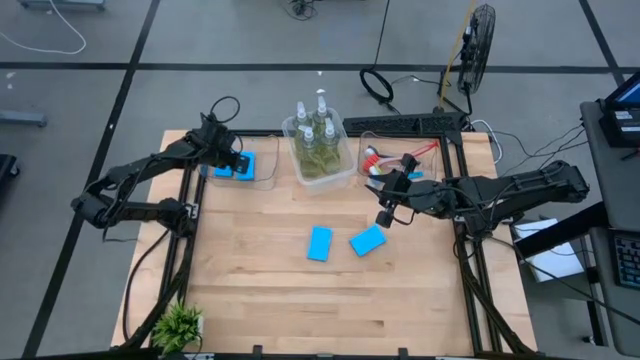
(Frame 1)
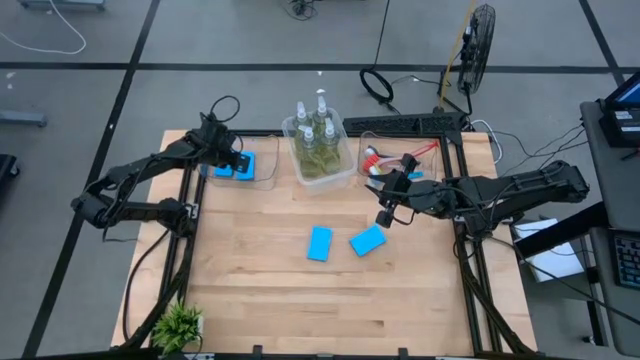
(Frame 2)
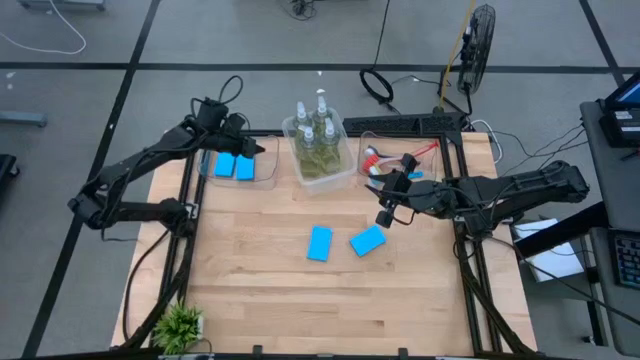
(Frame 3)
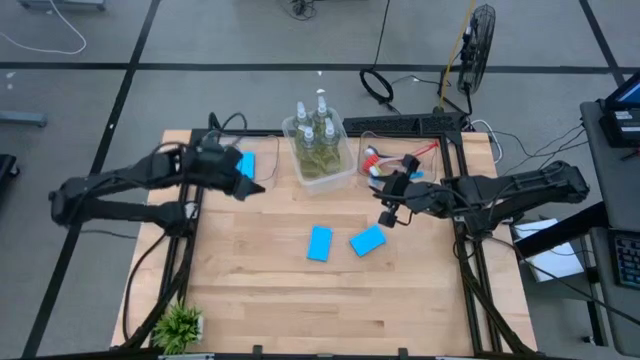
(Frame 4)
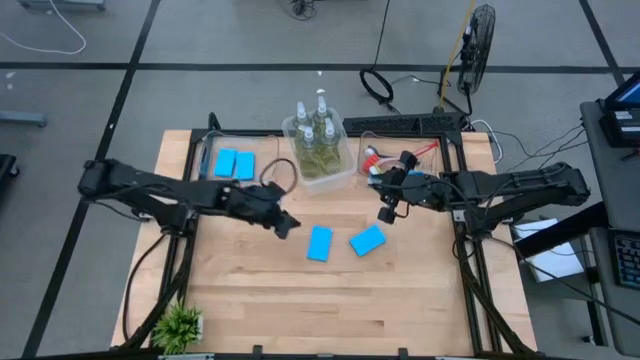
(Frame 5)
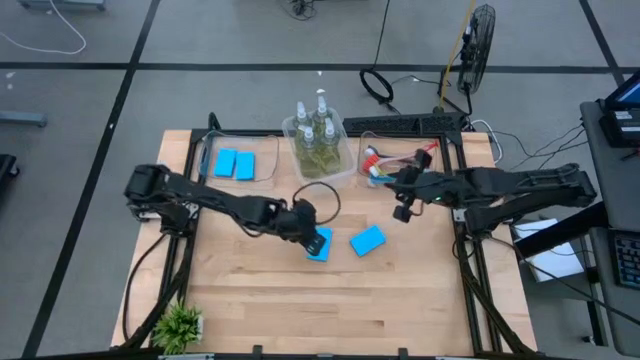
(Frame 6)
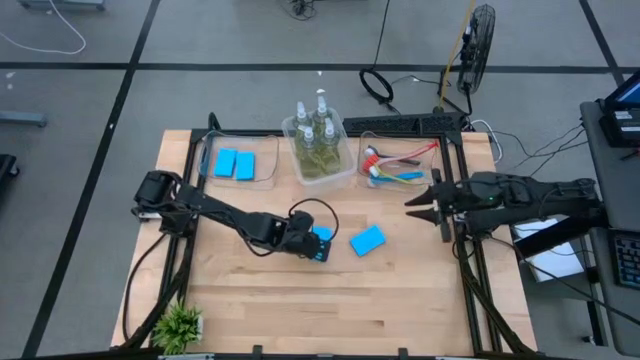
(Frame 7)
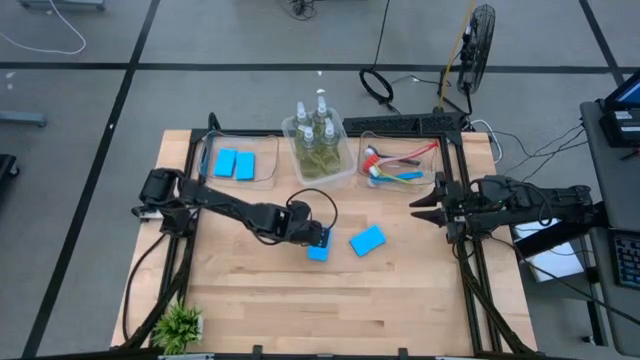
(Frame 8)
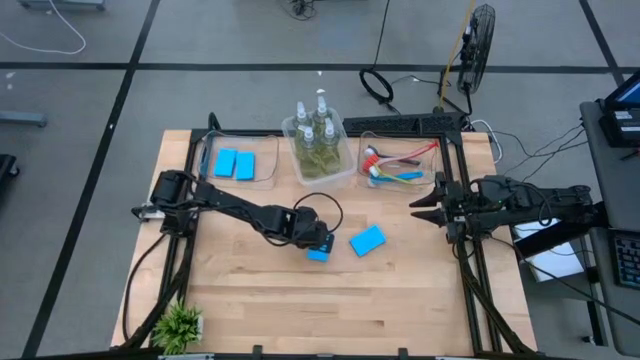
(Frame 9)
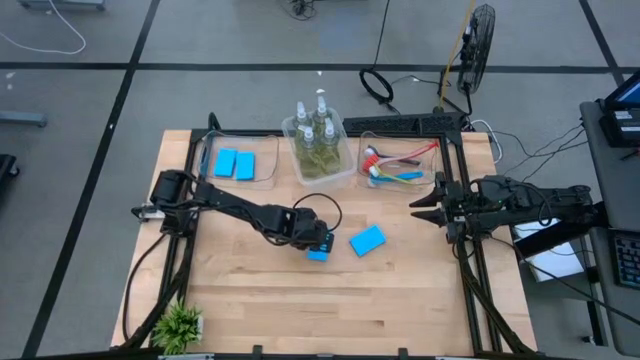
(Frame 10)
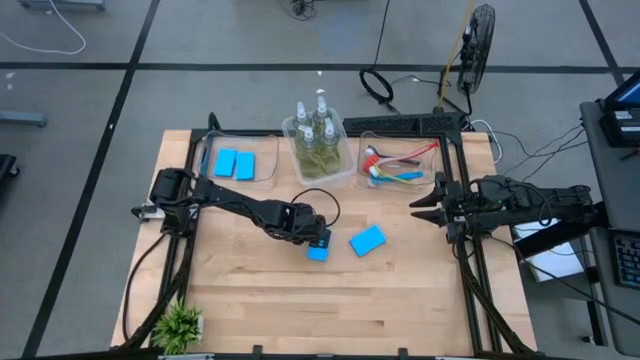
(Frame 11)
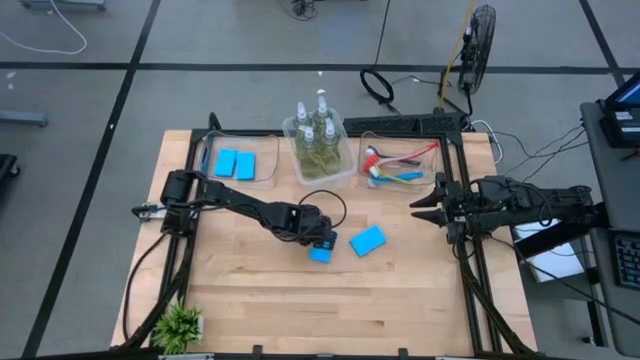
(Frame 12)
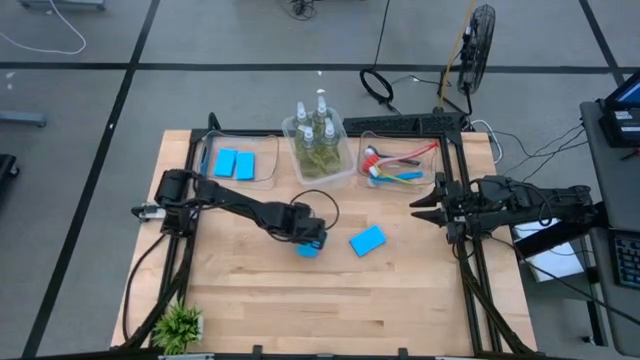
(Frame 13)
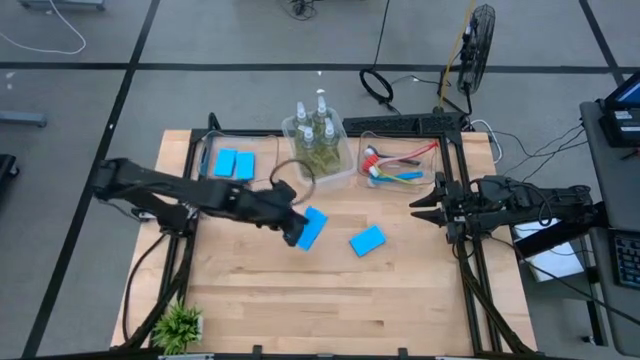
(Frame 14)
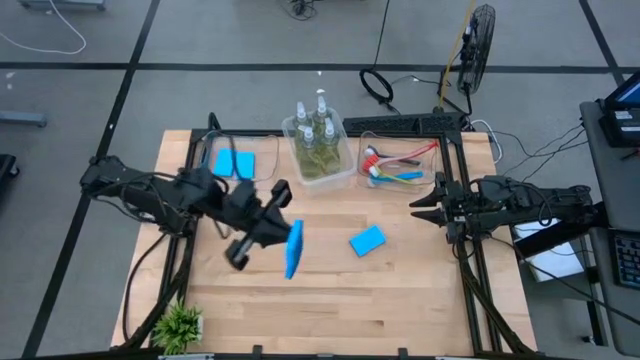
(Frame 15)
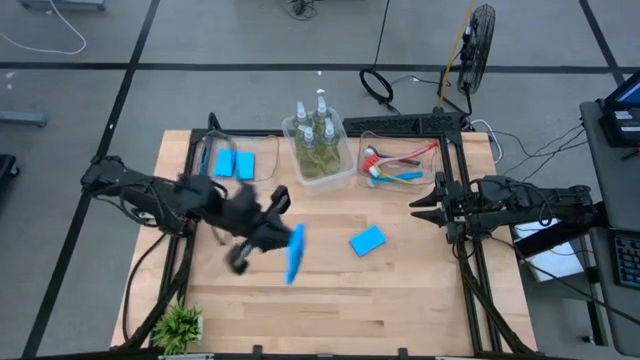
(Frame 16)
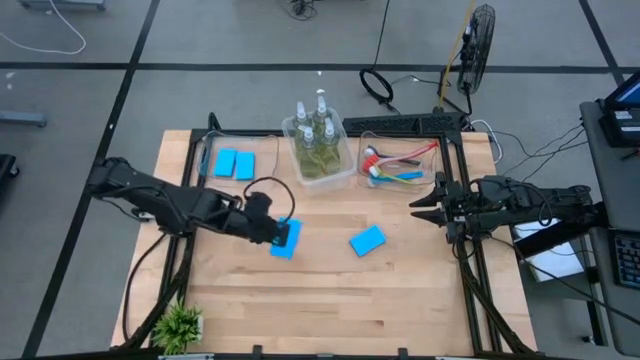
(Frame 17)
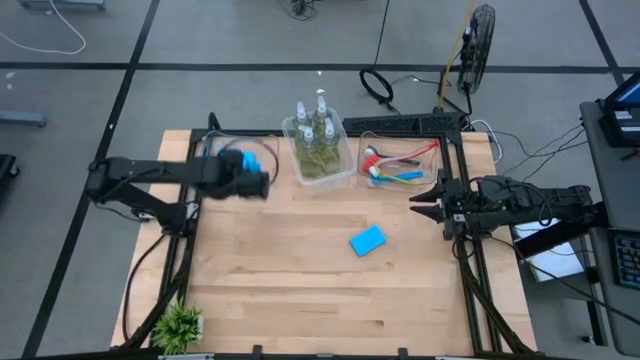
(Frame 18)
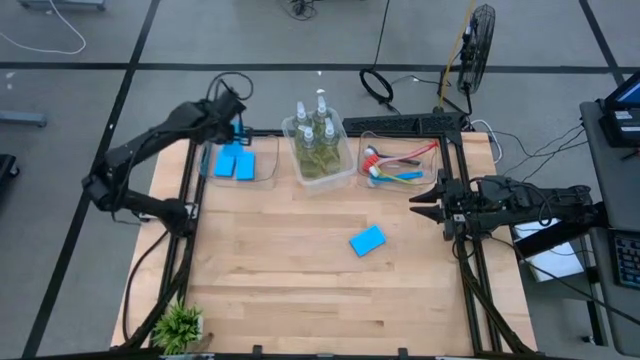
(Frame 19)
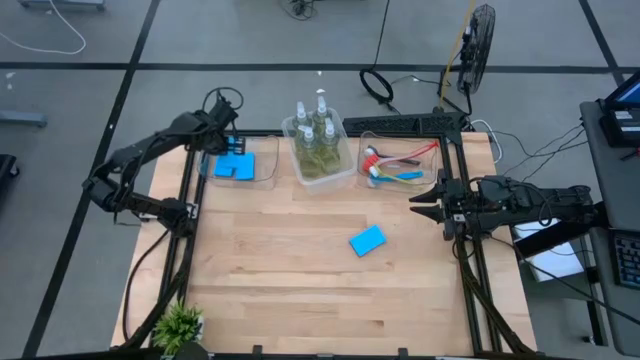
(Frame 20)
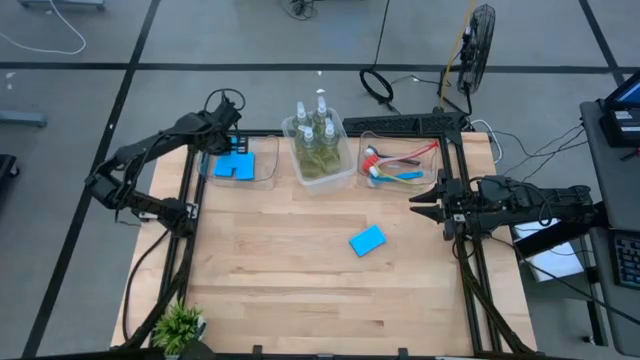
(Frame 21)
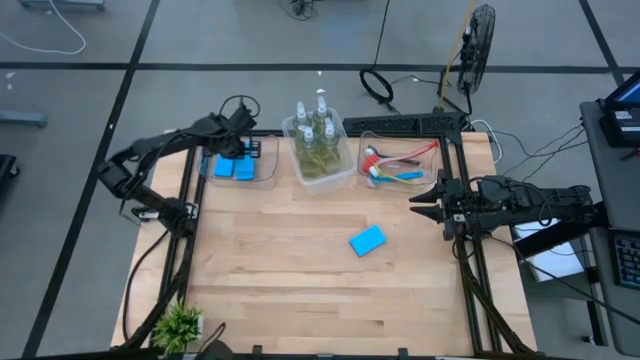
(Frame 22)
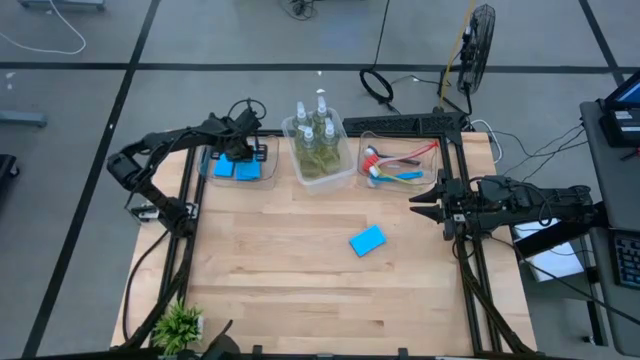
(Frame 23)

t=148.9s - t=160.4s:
Task: Pick & Place Kitchen Sink Supplies
Put the blue sponge into the left transparent bin

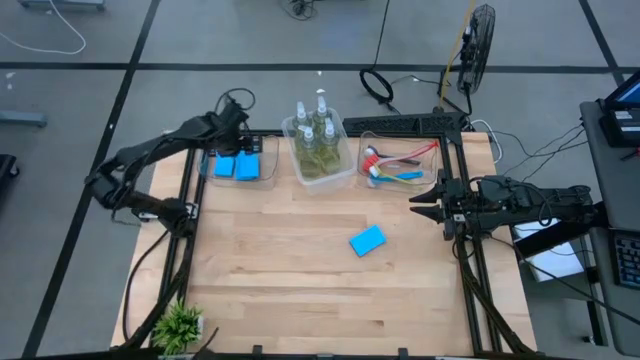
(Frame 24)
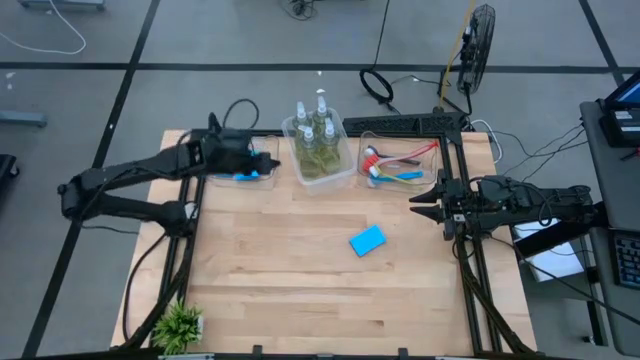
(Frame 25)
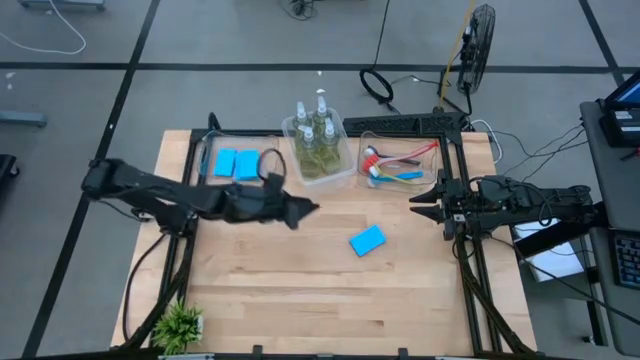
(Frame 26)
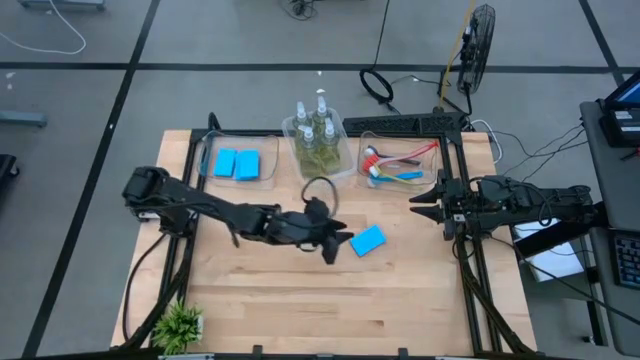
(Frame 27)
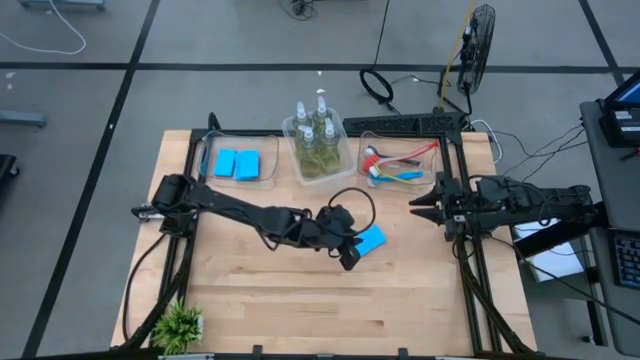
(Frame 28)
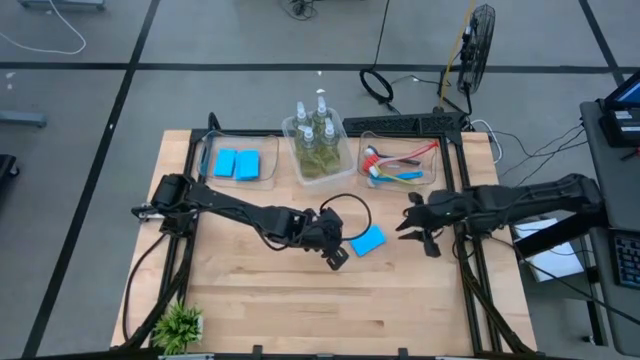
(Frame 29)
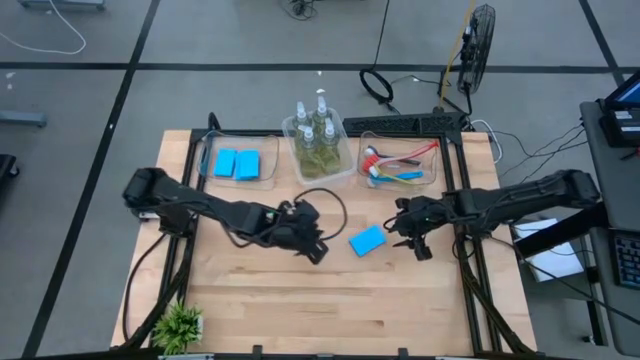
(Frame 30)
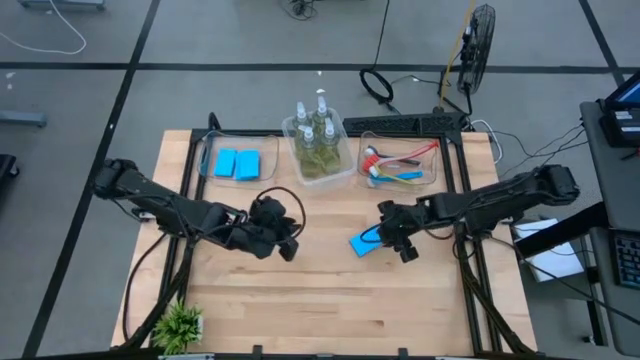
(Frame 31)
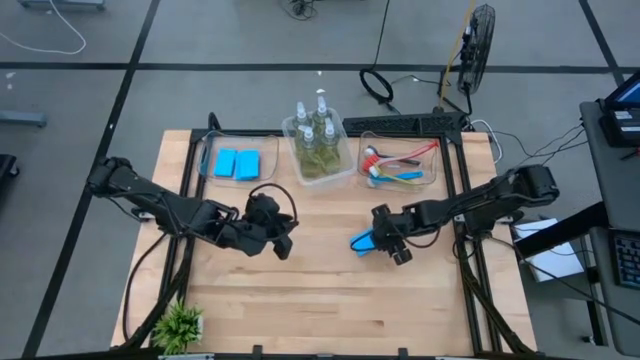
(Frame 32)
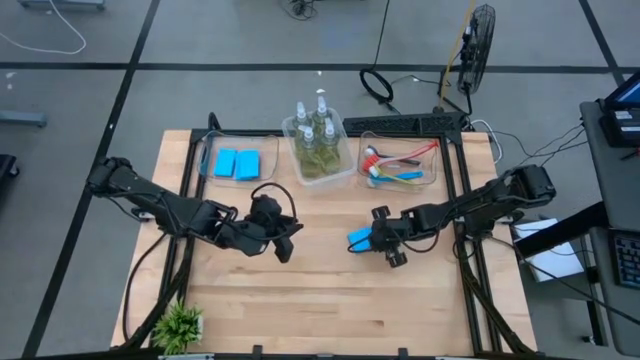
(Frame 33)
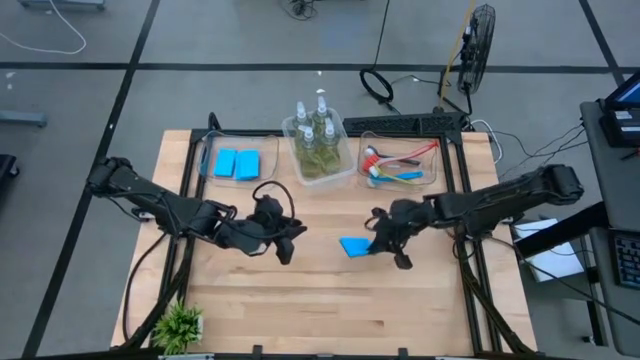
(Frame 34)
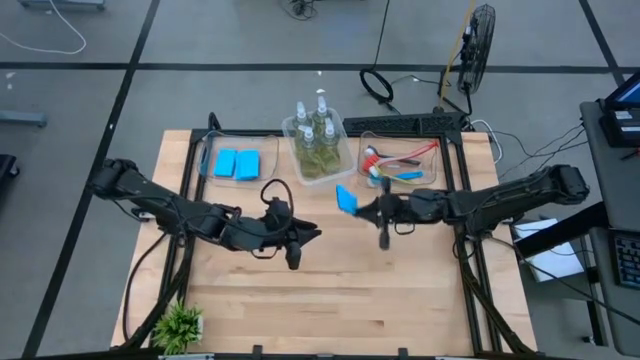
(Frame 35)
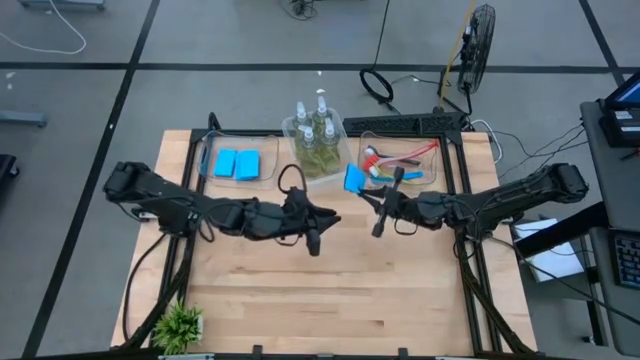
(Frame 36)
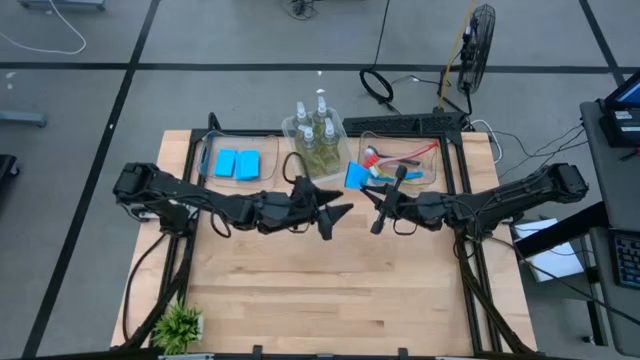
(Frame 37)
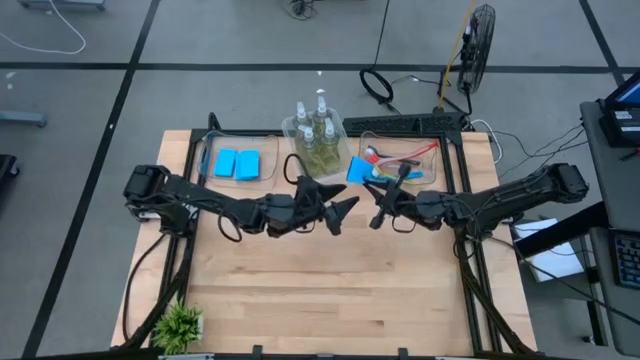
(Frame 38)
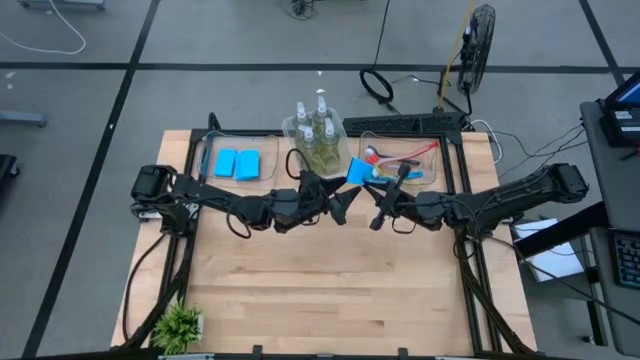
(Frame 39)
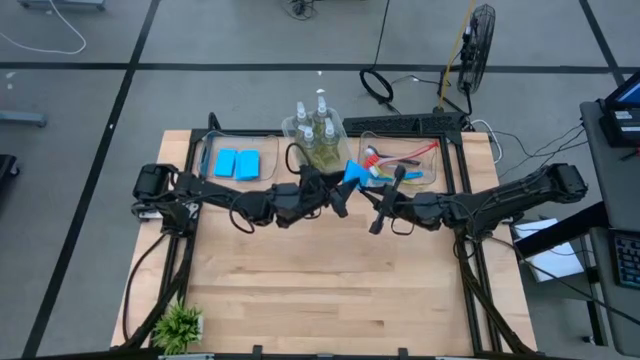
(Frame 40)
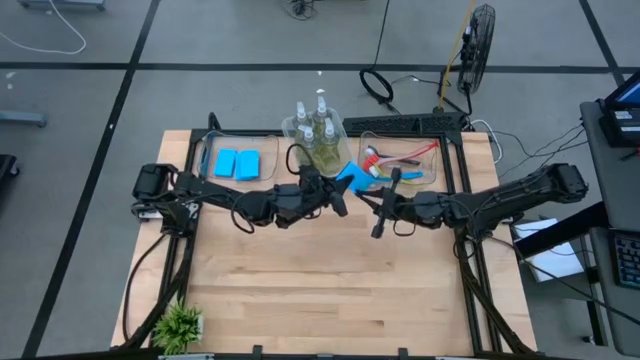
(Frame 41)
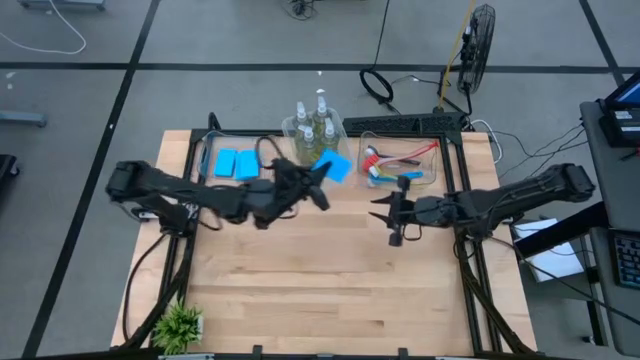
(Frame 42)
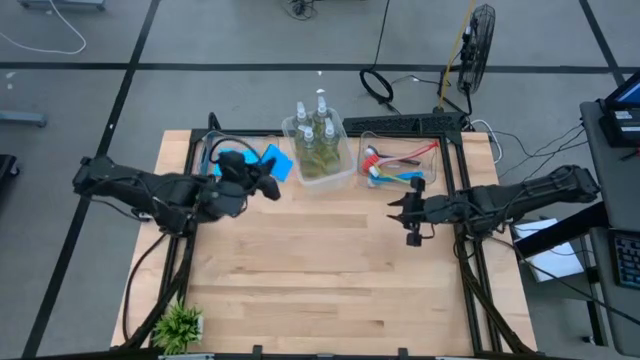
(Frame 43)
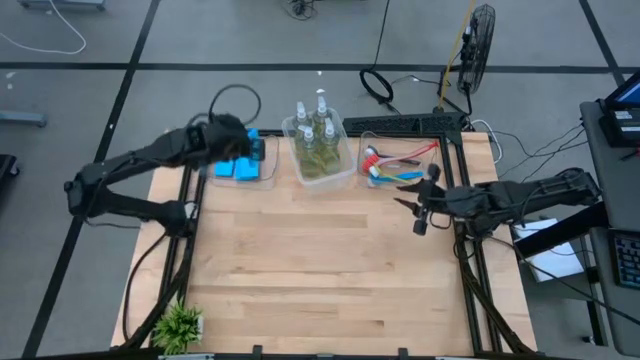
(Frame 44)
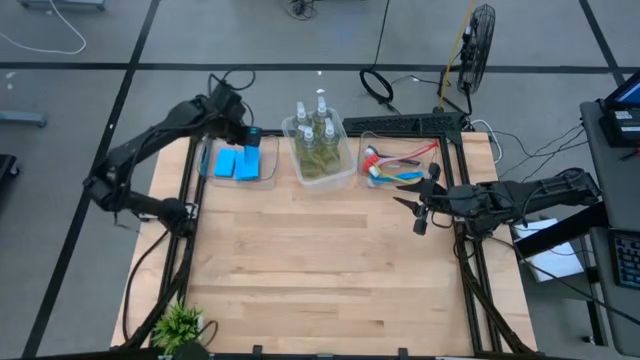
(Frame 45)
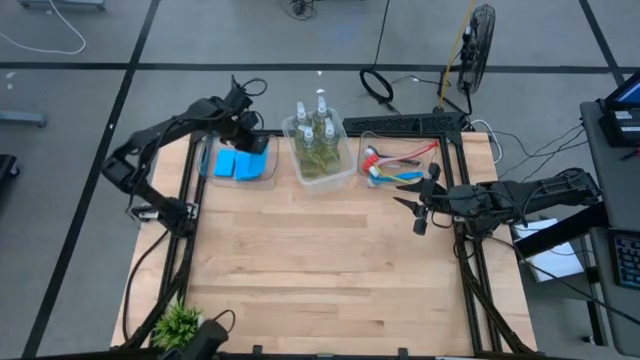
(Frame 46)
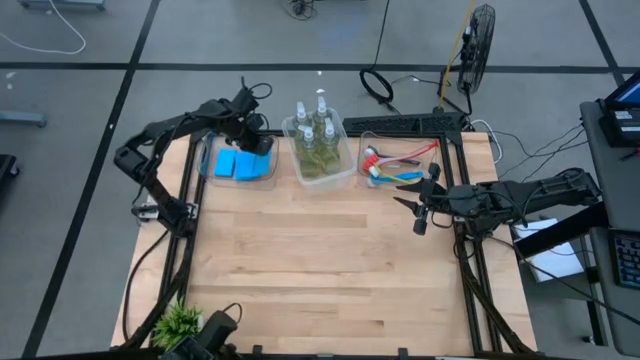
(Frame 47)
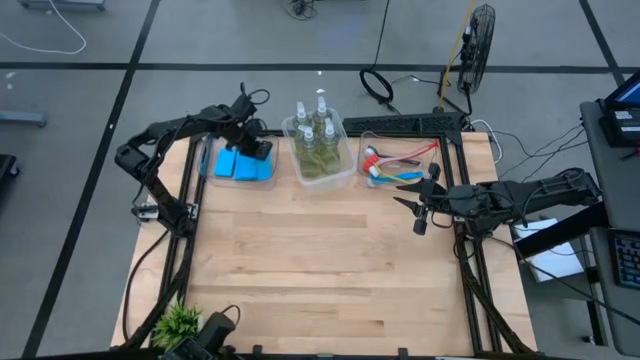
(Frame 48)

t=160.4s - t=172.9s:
Put the blue sponge into the left transparent bin
